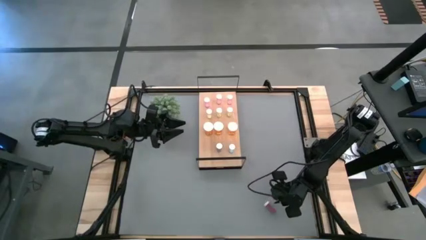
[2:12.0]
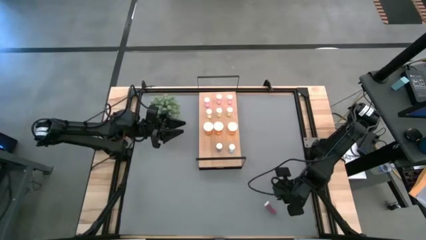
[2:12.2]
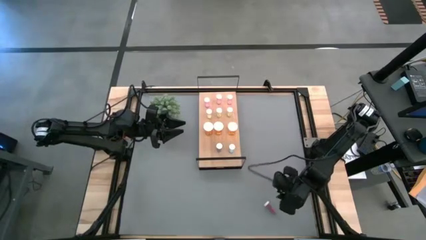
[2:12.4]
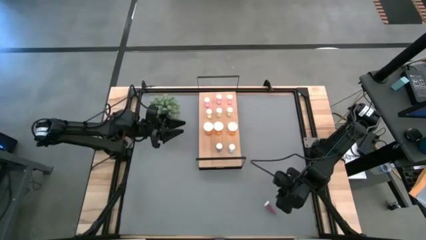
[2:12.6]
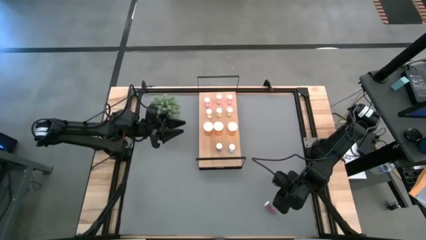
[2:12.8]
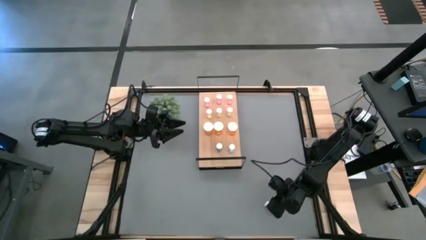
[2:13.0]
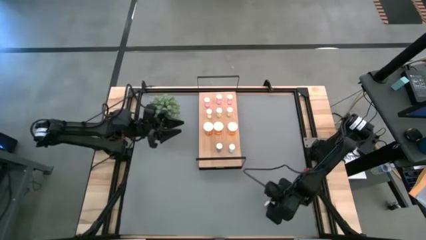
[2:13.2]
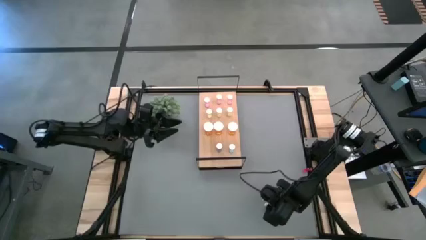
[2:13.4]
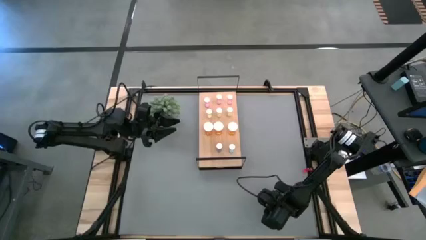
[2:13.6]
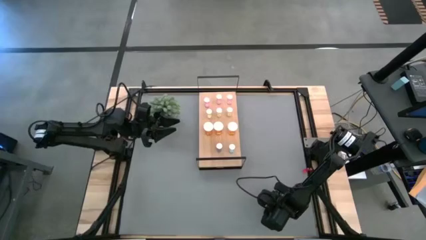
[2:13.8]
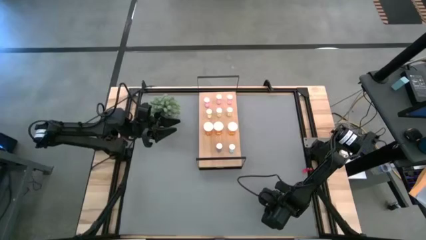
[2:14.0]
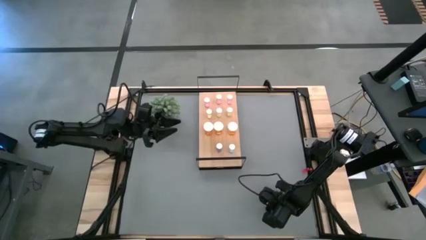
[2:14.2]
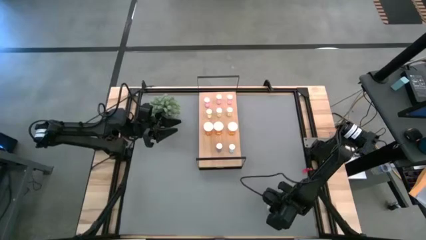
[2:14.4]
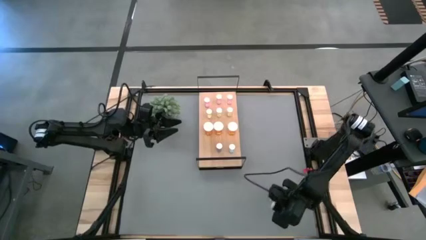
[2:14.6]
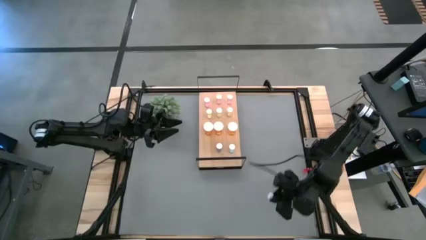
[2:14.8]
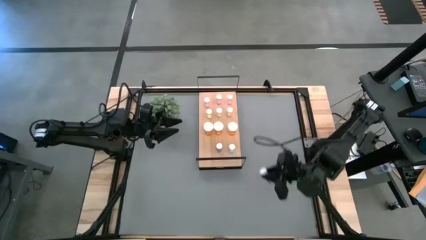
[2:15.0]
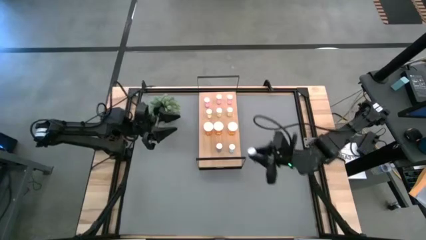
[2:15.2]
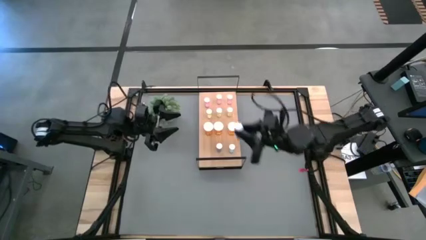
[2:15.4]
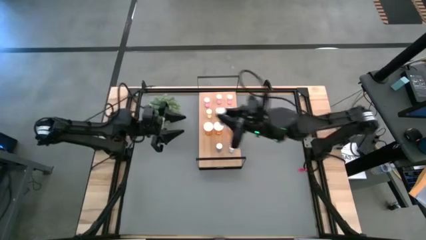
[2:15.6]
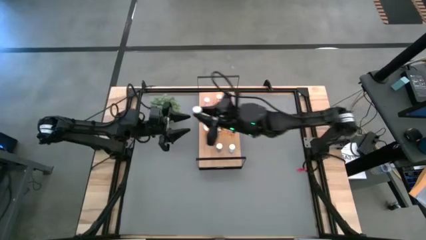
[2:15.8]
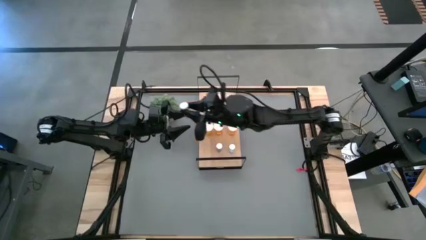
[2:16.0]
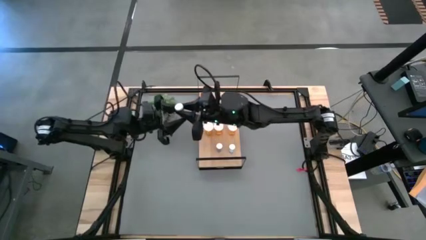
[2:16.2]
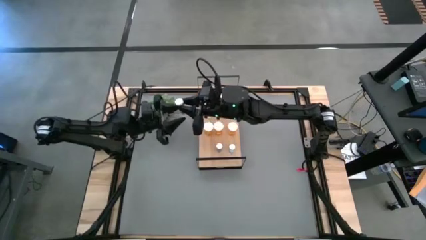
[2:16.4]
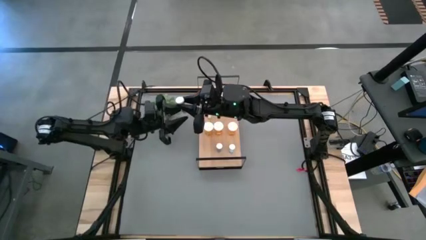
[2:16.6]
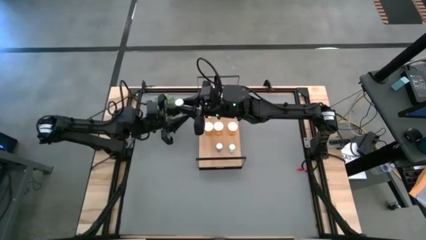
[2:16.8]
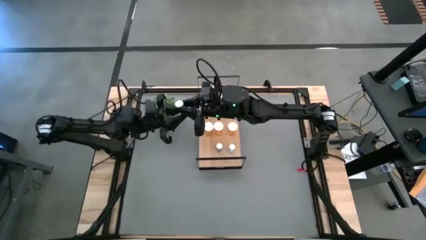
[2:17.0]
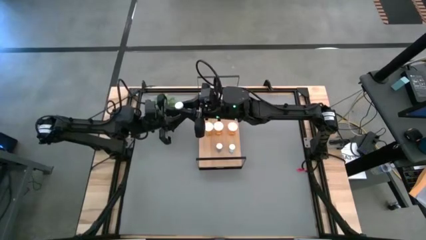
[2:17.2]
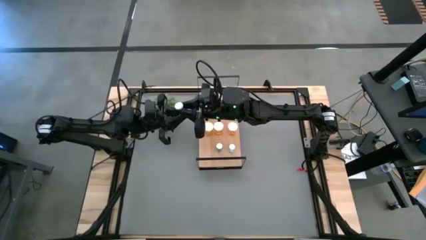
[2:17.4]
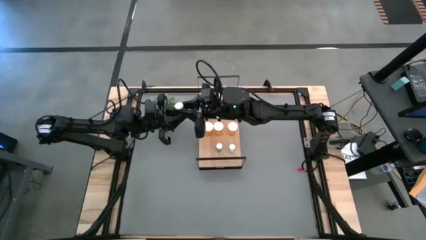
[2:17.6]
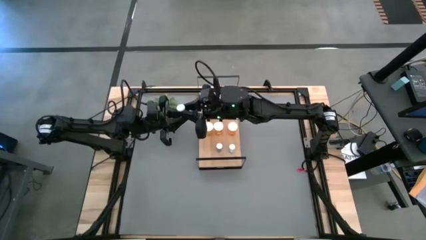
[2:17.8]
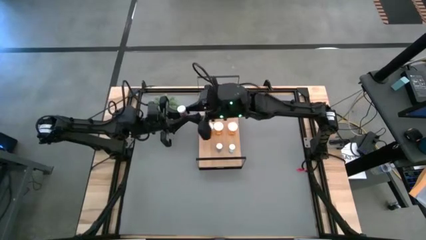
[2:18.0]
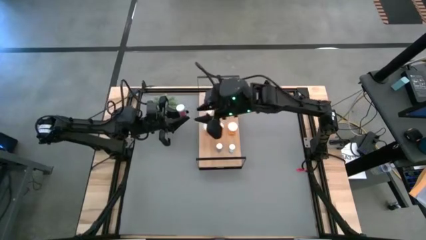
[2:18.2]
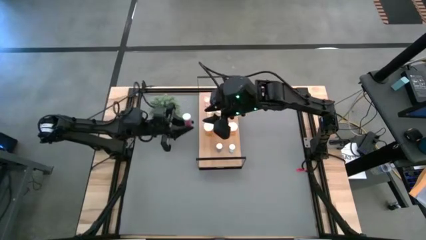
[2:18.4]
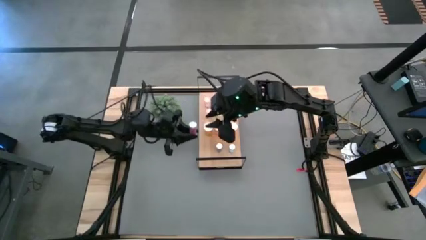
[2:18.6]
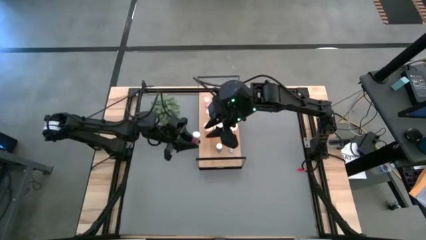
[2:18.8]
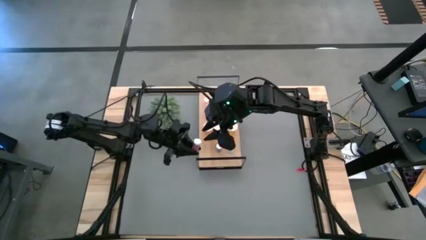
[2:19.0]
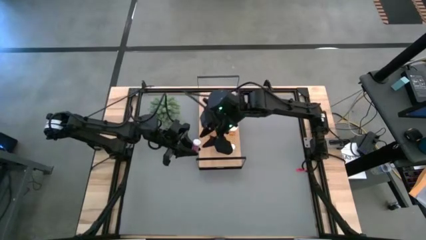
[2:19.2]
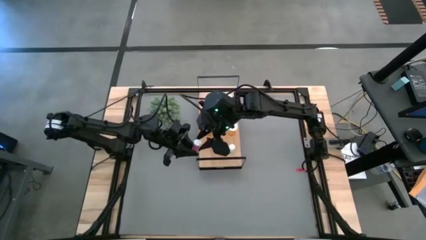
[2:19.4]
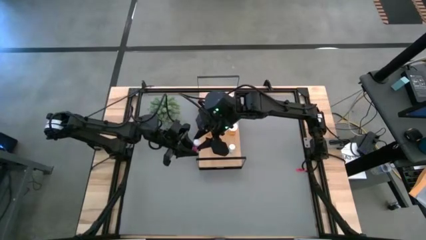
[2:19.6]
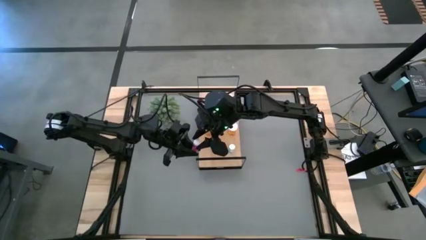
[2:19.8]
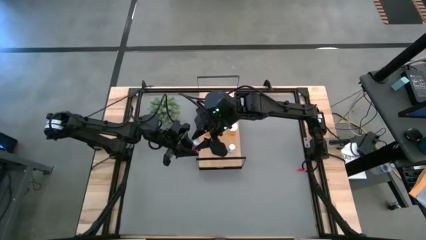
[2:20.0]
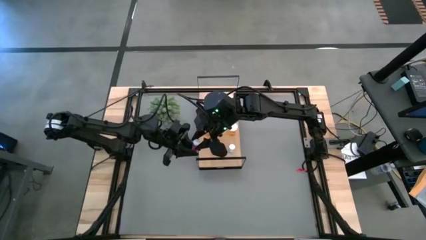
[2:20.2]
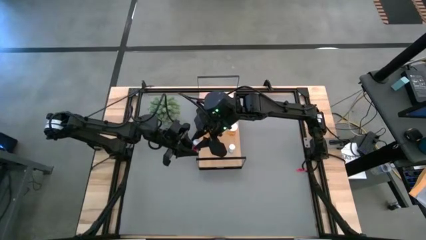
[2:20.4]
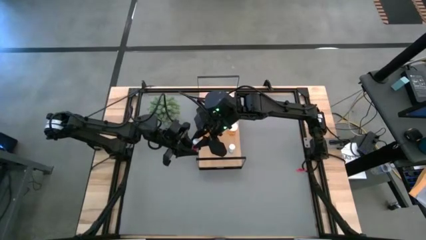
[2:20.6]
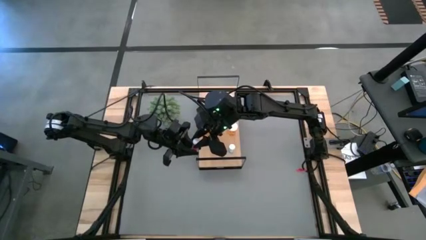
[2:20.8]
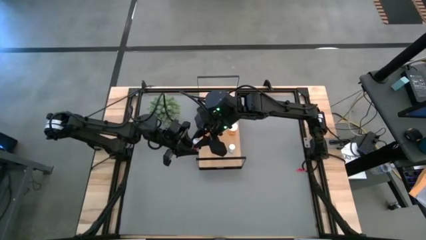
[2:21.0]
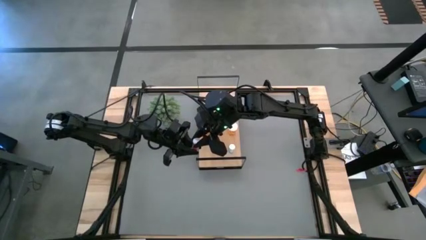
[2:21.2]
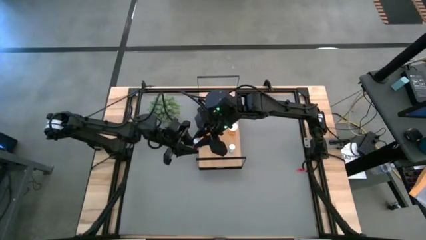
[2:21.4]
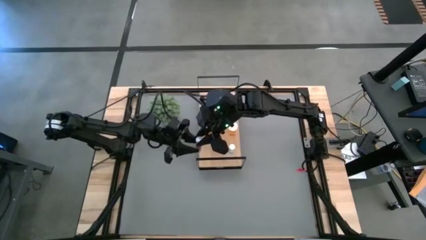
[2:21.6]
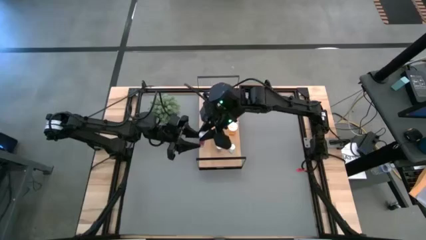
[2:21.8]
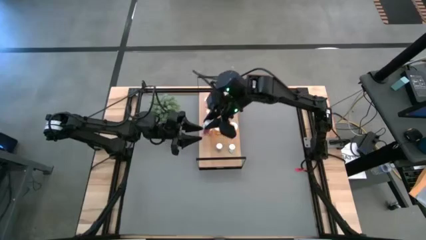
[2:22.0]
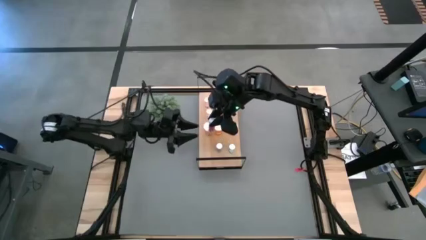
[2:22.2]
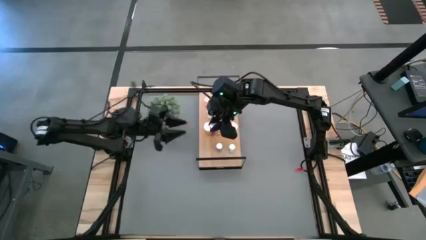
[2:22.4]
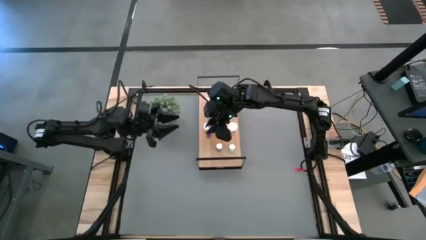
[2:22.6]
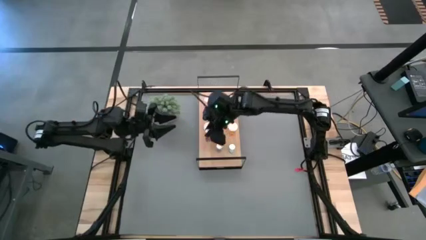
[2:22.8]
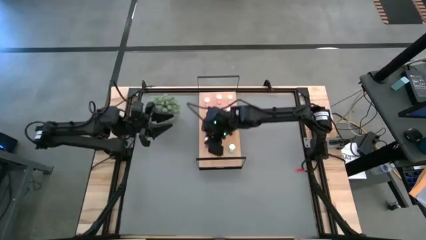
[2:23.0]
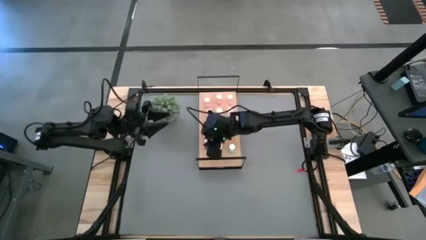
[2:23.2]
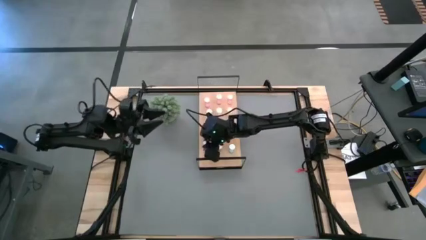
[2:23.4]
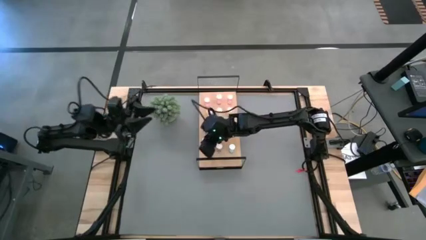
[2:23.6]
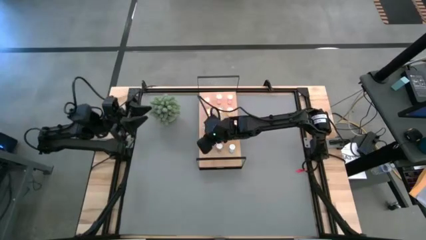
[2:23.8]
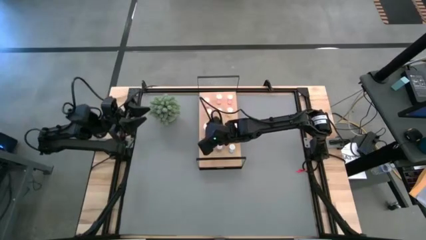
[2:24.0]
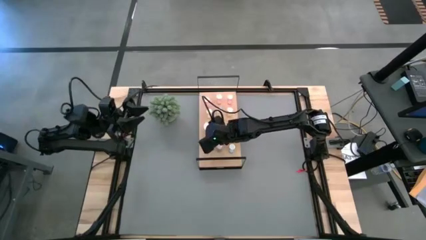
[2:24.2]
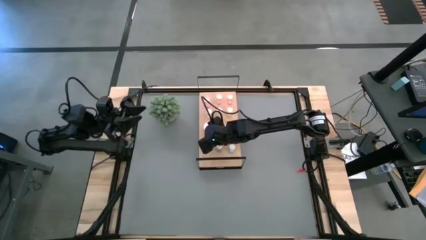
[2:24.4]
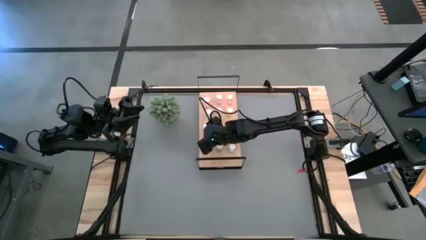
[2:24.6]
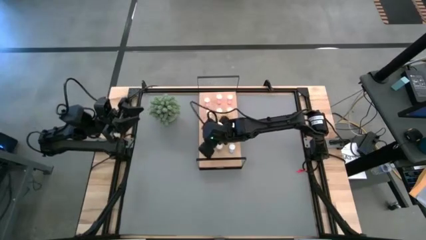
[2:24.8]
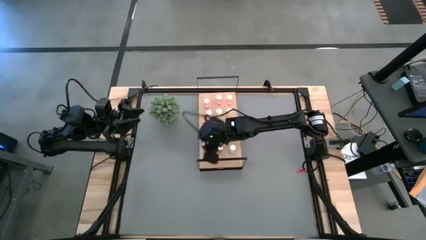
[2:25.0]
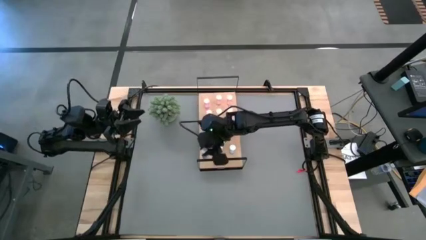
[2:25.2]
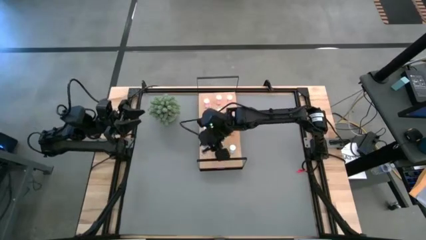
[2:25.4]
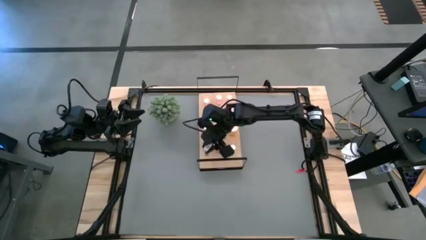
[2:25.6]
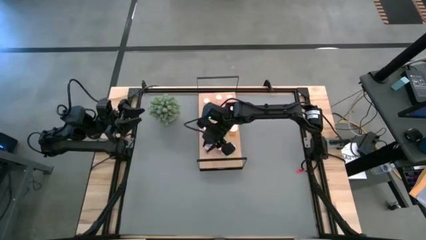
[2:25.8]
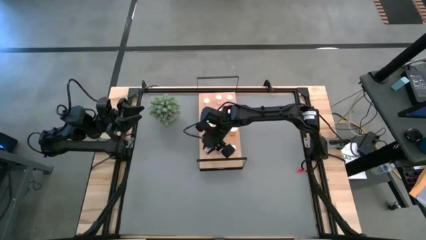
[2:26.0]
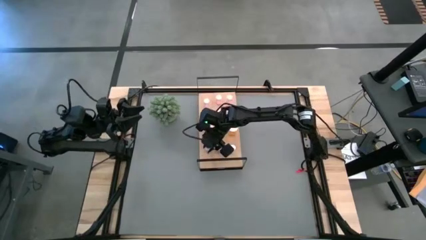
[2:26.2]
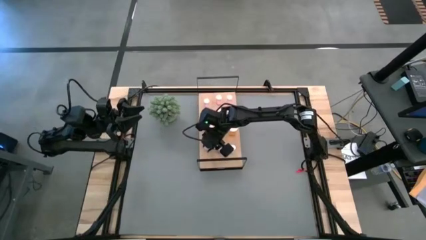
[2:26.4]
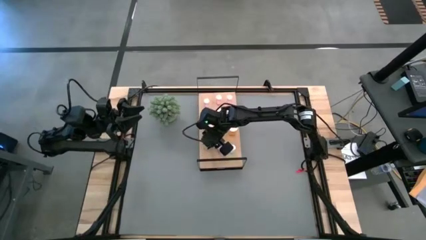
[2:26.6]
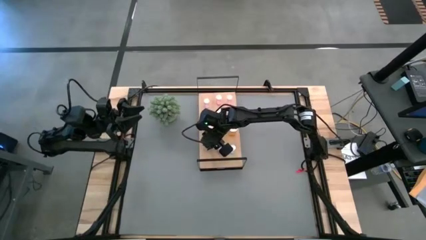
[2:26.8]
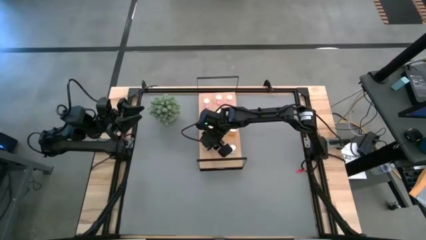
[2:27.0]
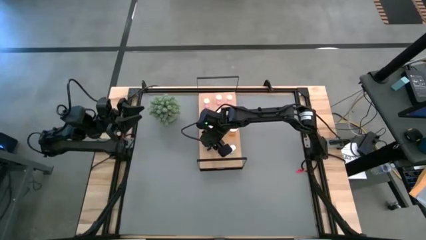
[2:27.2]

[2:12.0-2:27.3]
Task: Pick and place medicine bottles onto shelf by color
Put the blue pill bottle aligned with the other blue pill bottles on the shelf
